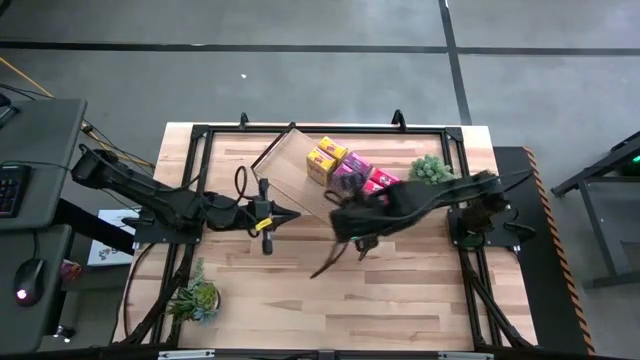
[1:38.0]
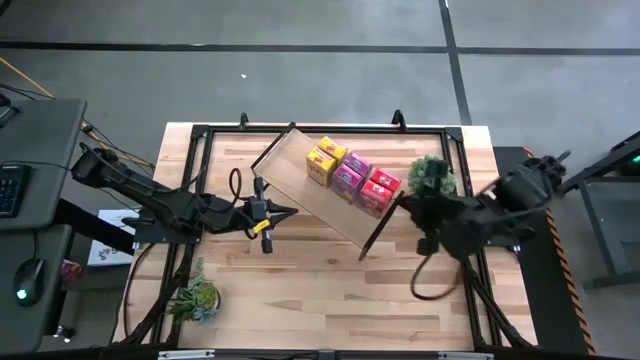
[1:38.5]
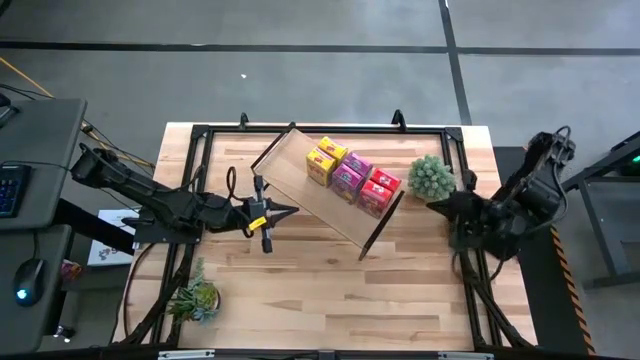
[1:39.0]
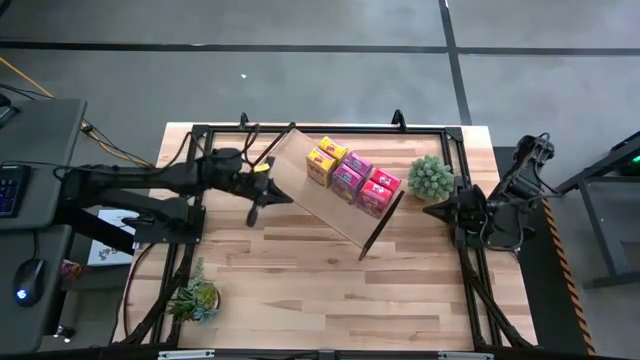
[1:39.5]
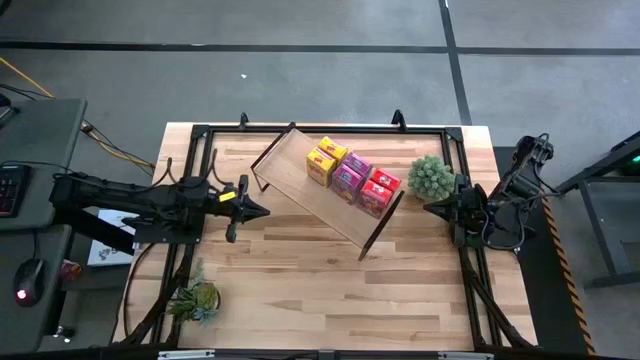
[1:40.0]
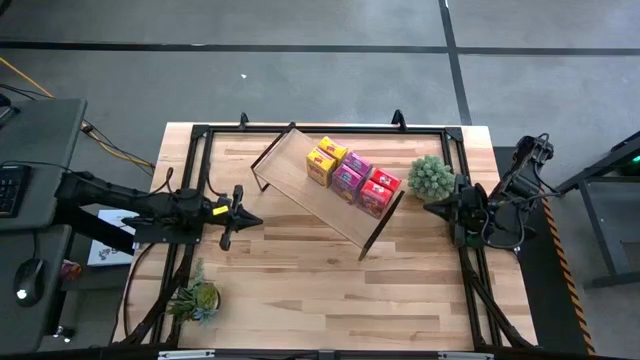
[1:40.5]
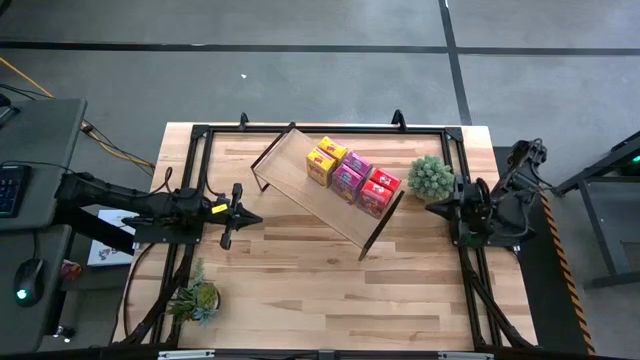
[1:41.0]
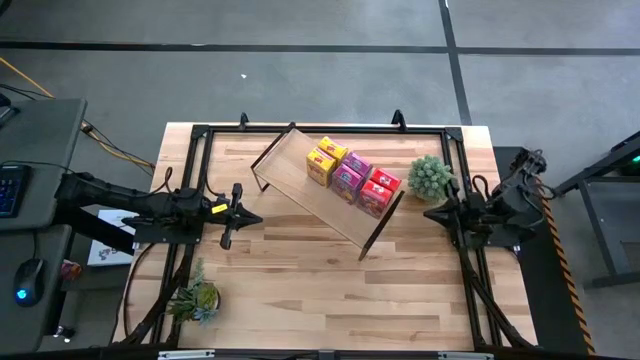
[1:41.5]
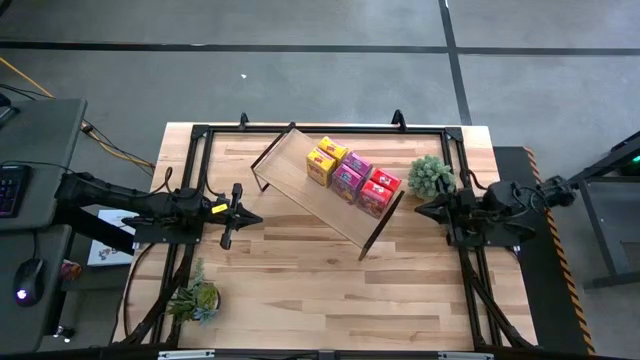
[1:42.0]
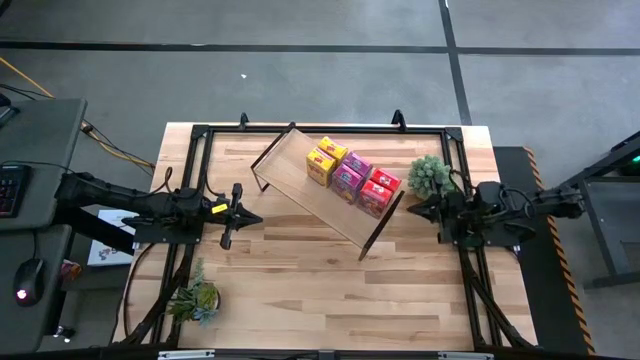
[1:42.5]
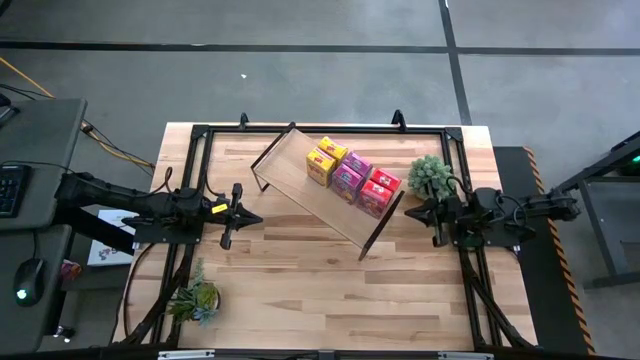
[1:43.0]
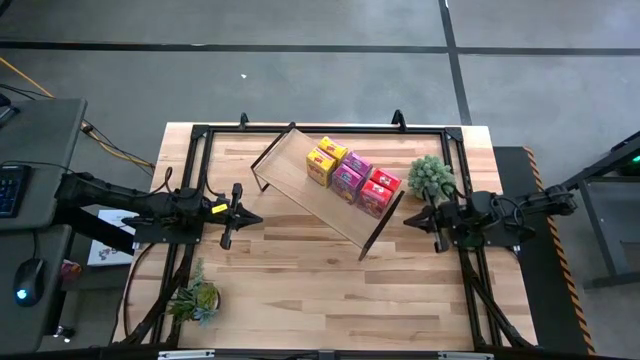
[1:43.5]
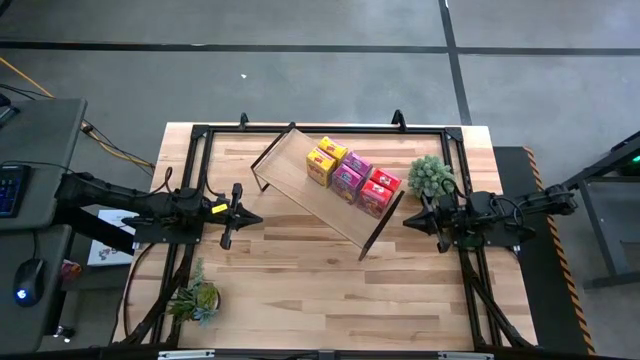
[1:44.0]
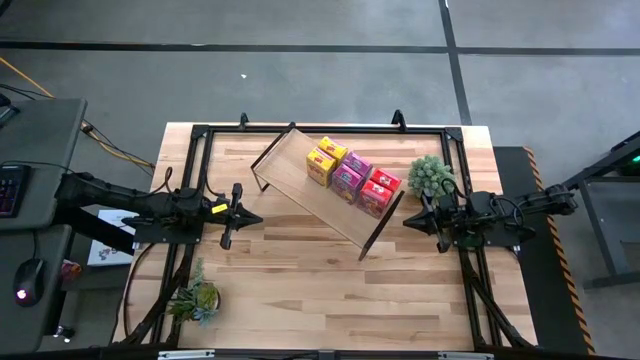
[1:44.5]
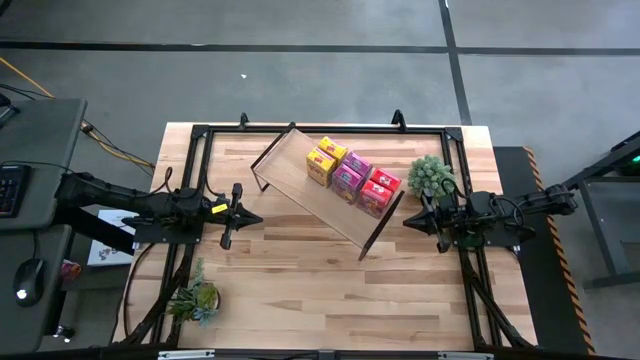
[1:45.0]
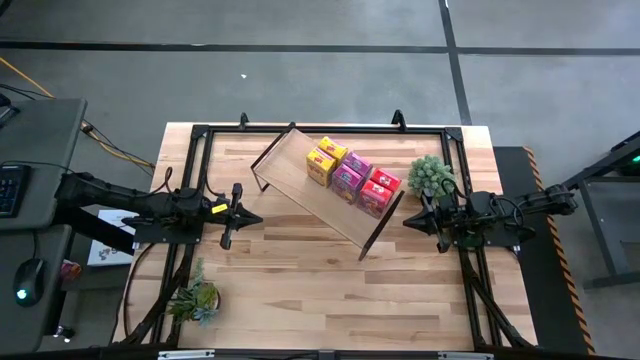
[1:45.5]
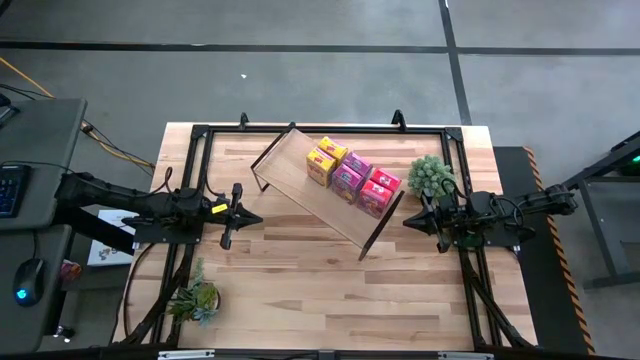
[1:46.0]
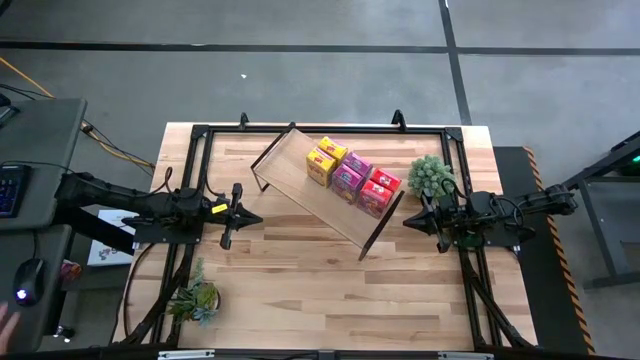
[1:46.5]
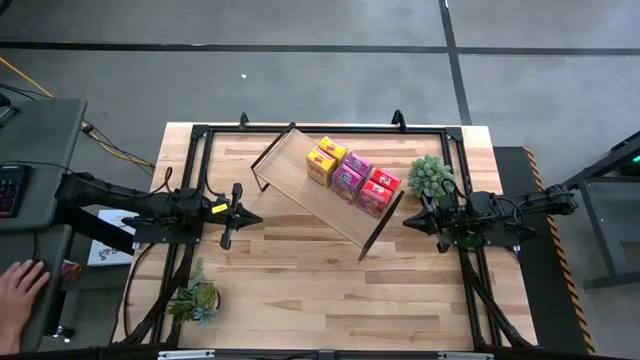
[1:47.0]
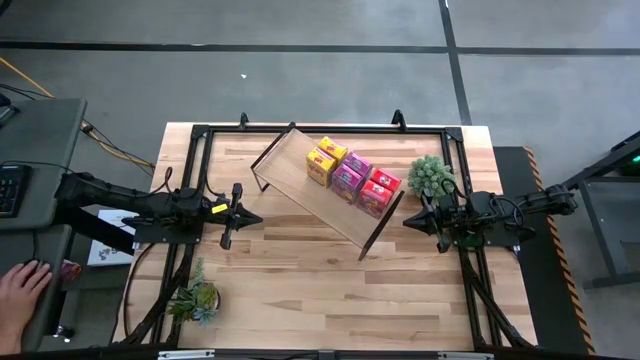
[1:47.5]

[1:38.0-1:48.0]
Task: Stack cereal on shelf
Return to Home Position

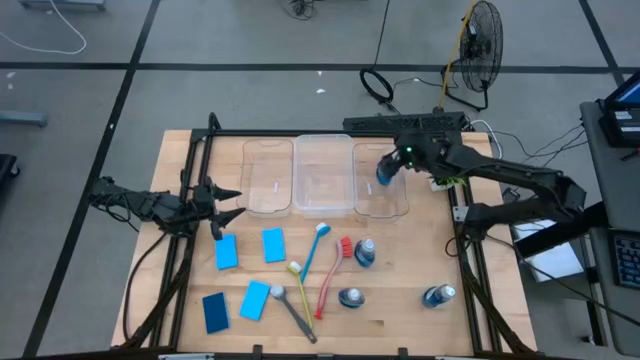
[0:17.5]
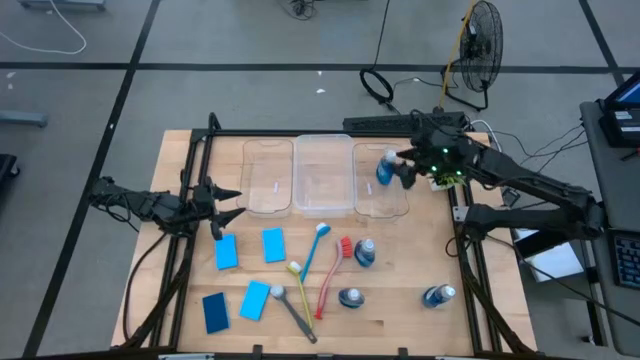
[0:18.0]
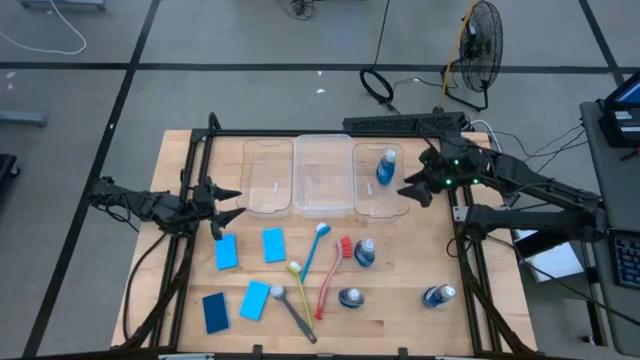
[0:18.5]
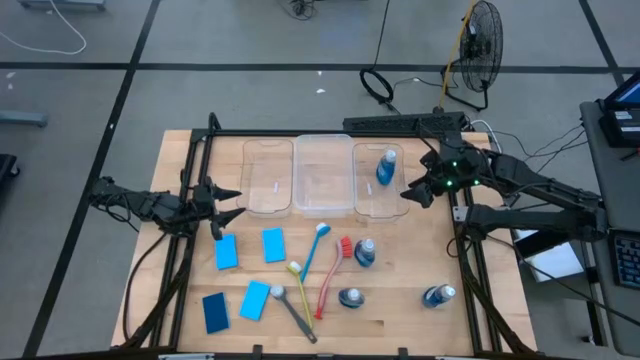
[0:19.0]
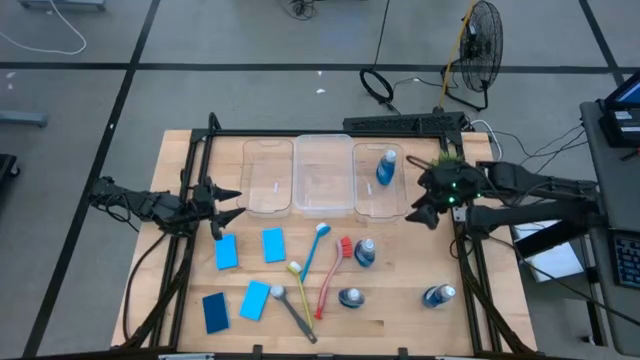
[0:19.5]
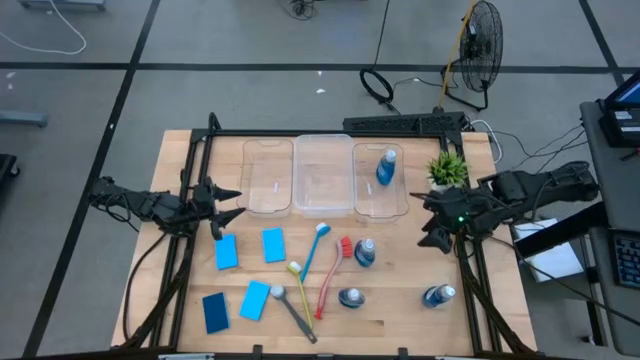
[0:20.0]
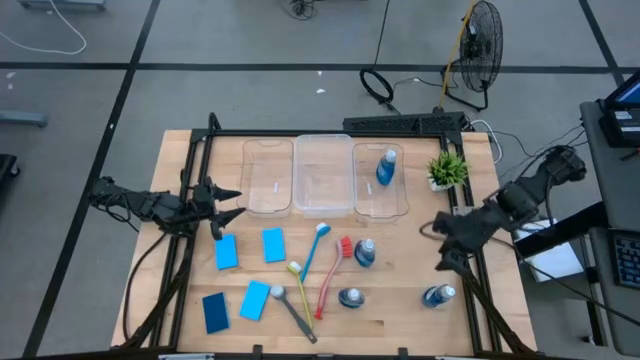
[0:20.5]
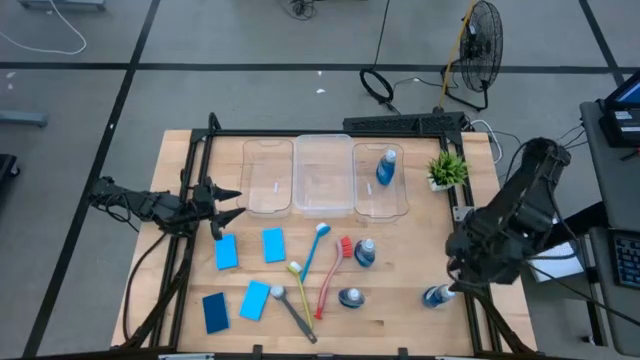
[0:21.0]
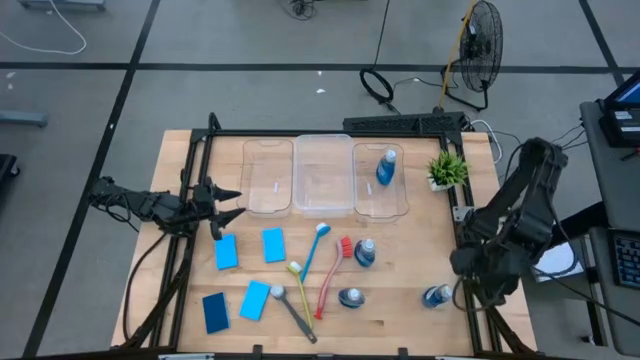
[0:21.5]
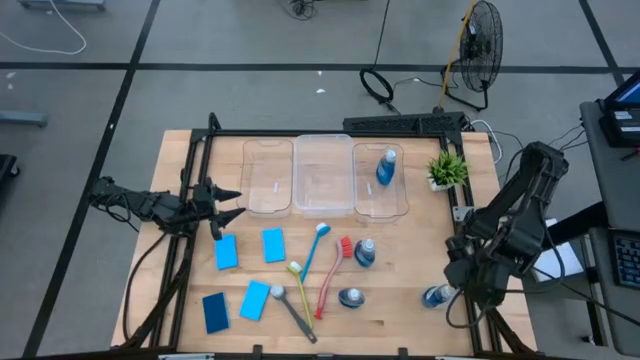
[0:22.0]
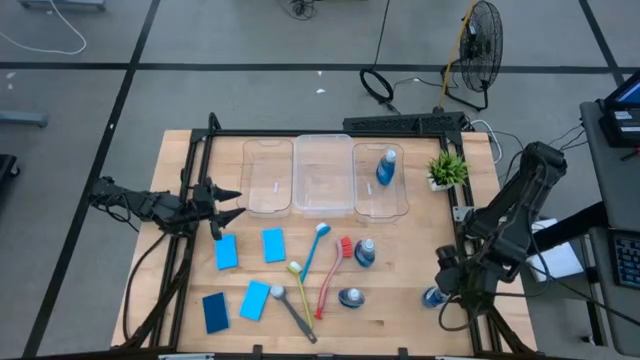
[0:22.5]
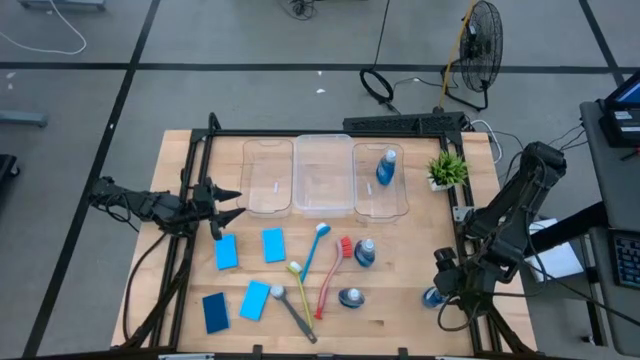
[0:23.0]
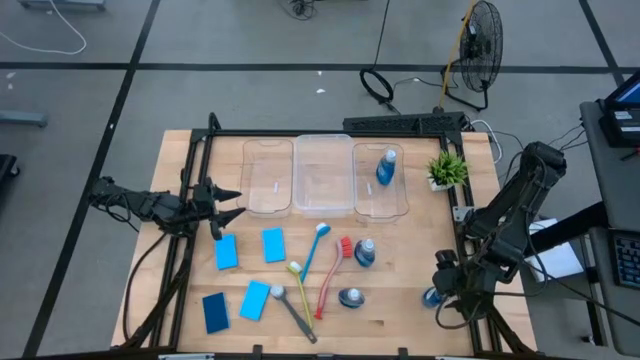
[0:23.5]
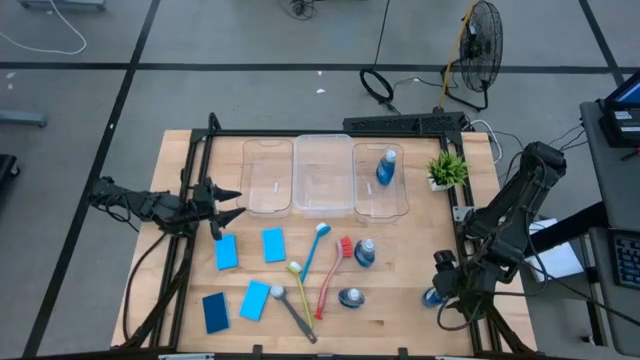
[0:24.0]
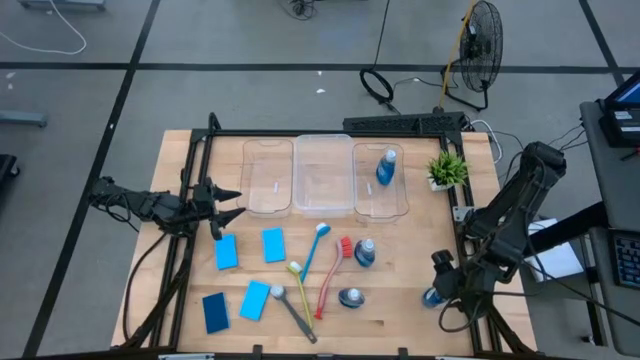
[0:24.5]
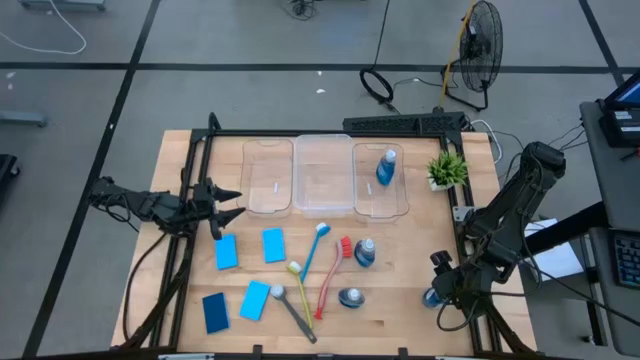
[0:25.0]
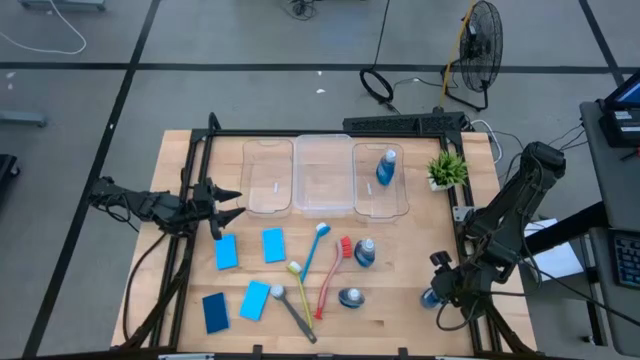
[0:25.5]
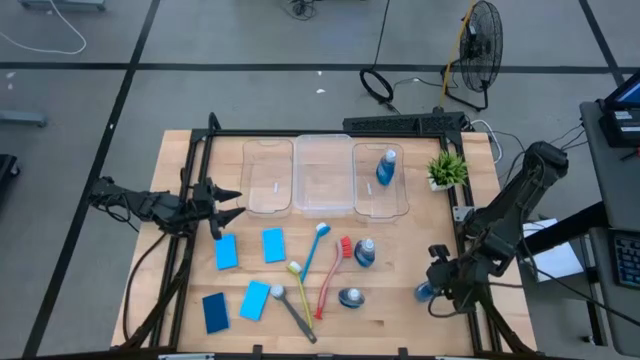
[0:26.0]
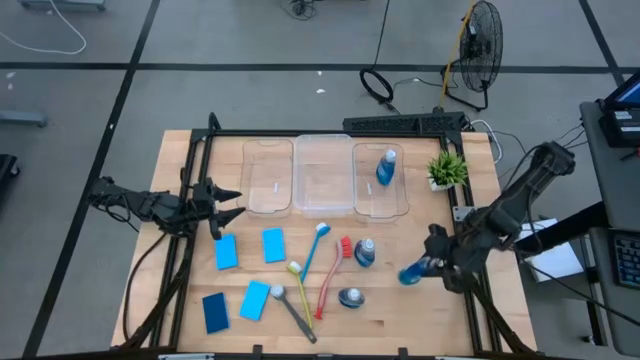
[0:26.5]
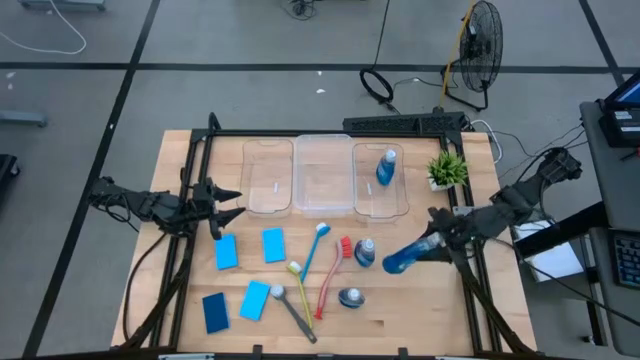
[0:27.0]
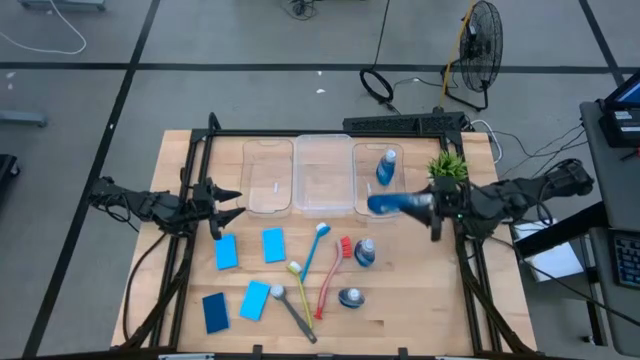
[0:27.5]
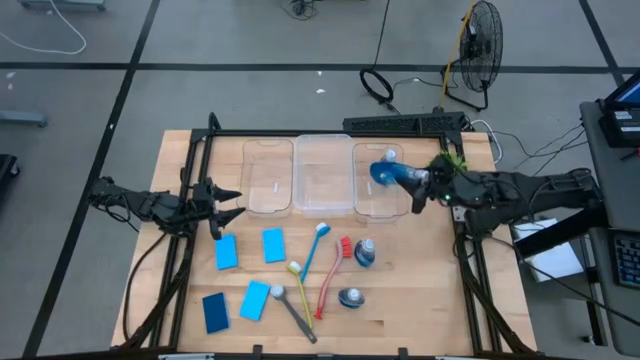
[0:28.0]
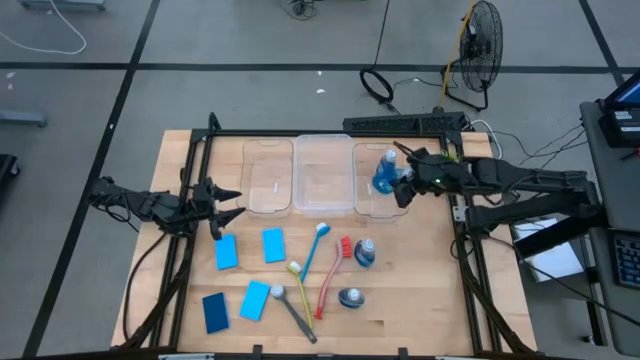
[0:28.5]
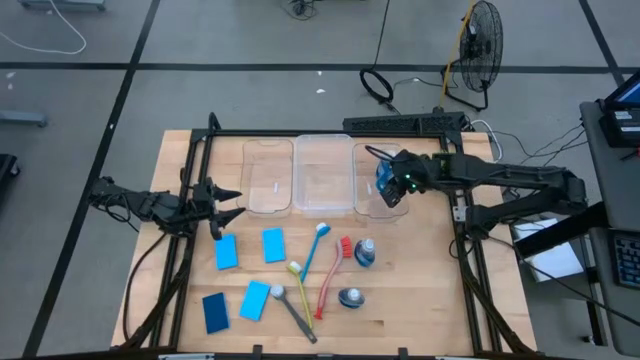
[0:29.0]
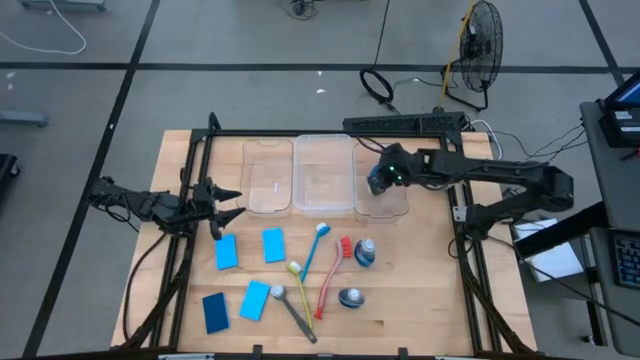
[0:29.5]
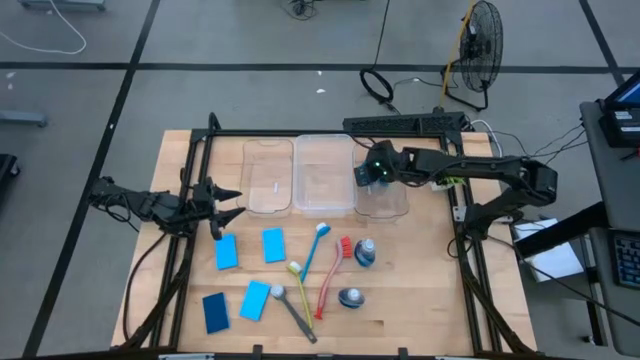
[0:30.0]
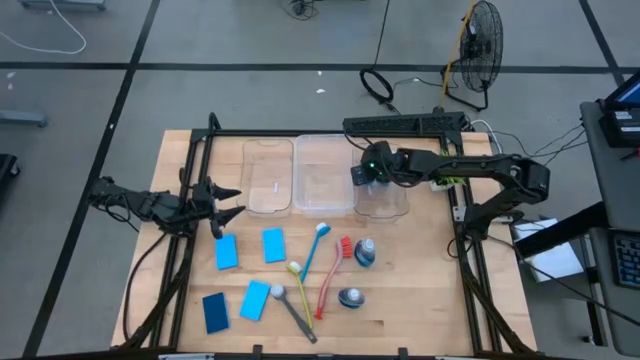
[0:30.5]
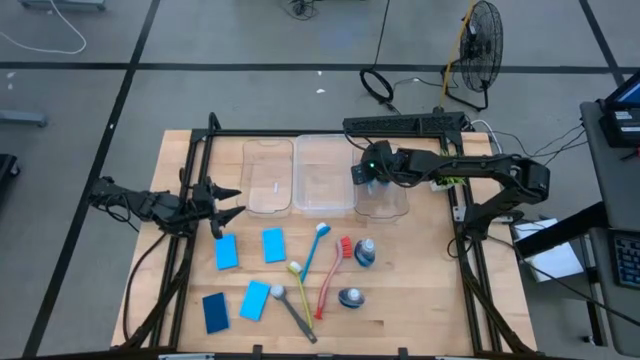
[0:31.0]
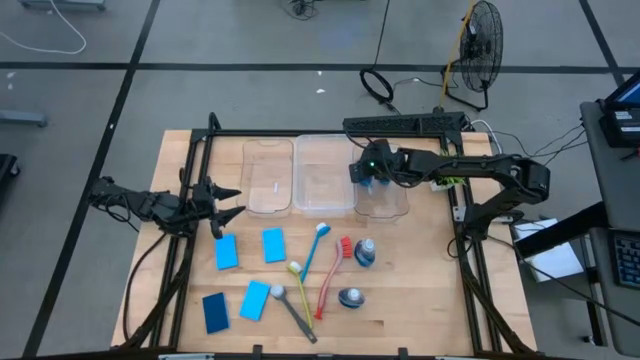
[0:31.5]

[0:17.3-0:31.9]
Task: Pick & Place Kitchen Sink Supplies
Put the blue dishwashing liquid bottle into the right transparent bin
